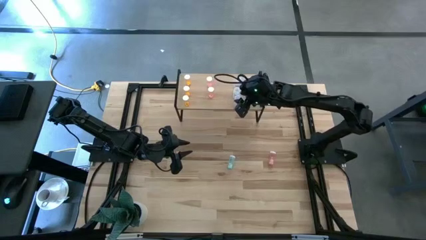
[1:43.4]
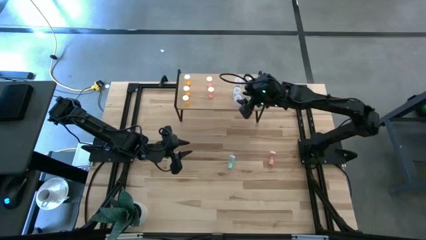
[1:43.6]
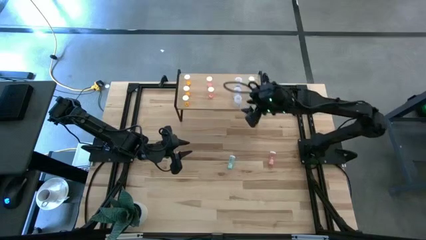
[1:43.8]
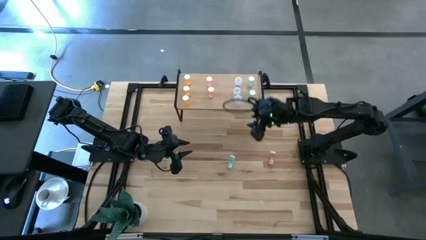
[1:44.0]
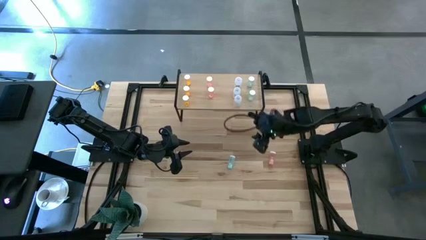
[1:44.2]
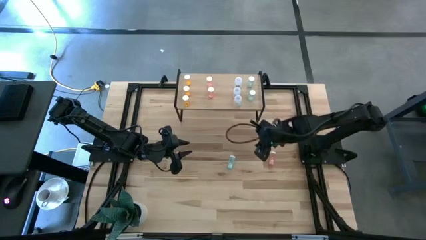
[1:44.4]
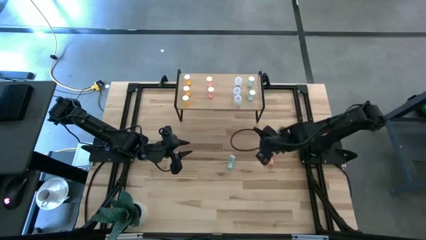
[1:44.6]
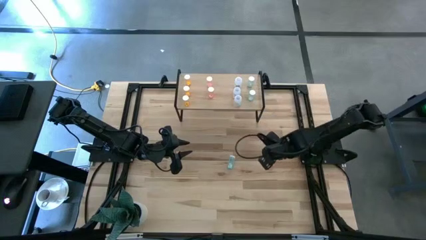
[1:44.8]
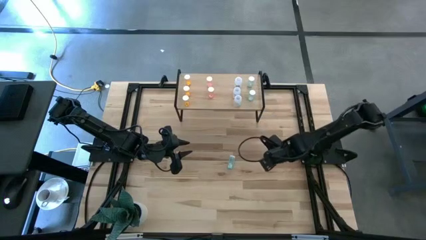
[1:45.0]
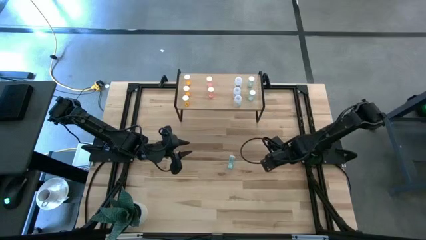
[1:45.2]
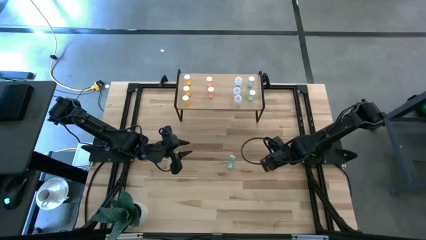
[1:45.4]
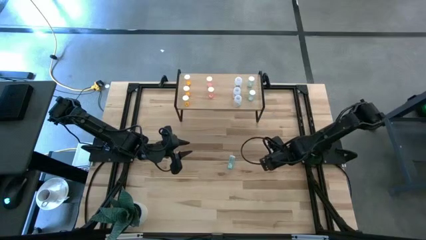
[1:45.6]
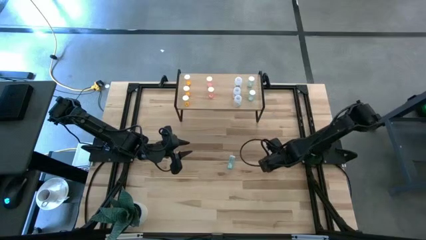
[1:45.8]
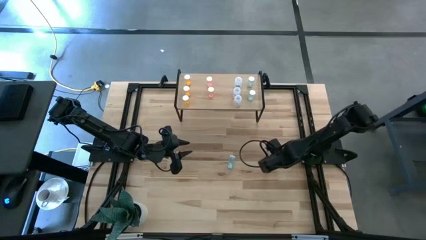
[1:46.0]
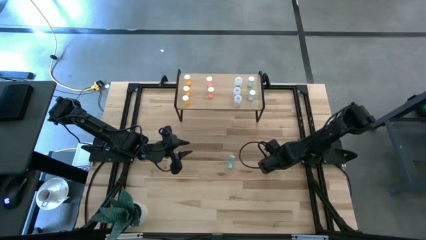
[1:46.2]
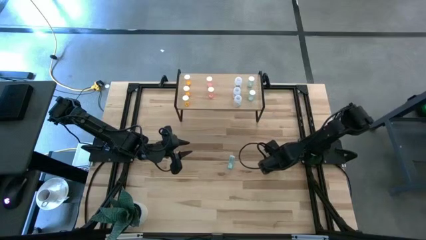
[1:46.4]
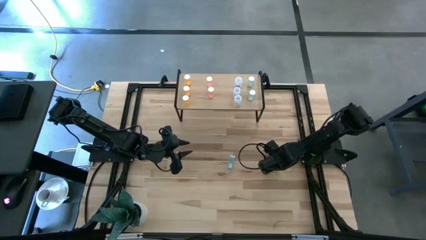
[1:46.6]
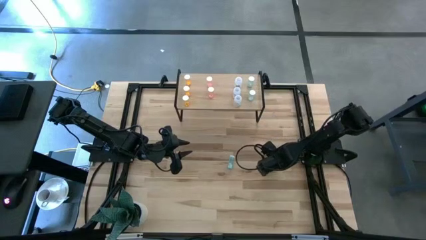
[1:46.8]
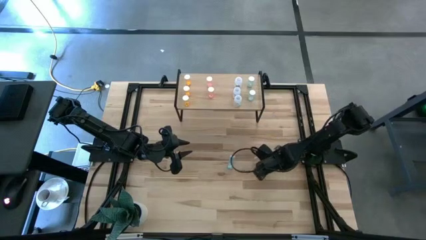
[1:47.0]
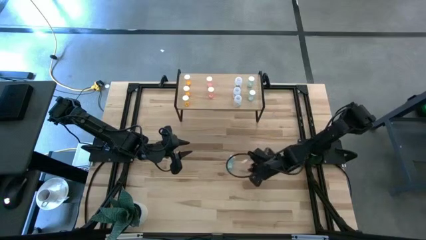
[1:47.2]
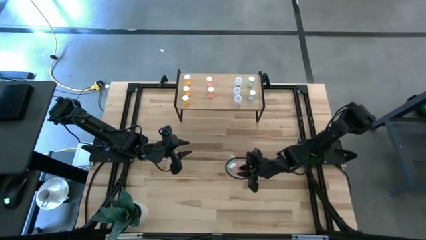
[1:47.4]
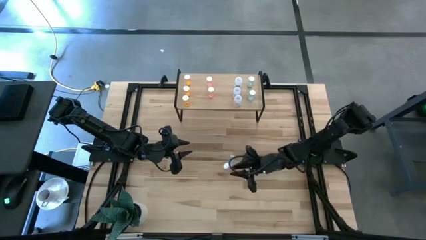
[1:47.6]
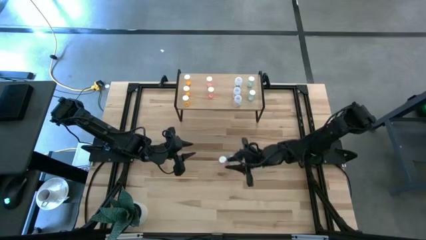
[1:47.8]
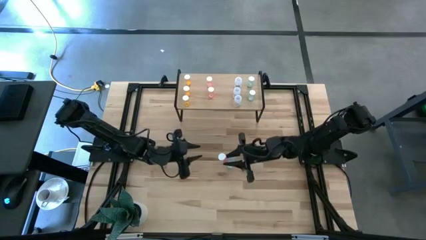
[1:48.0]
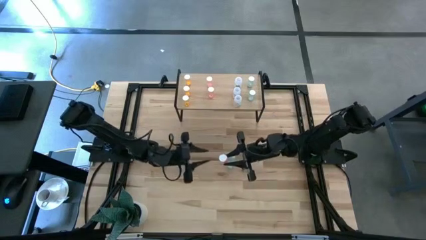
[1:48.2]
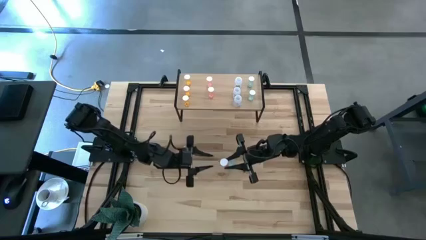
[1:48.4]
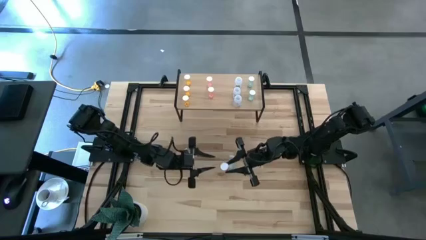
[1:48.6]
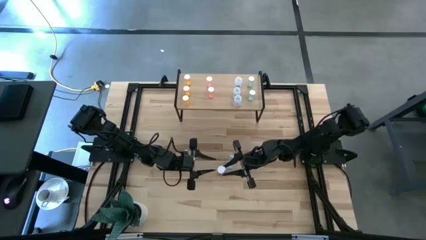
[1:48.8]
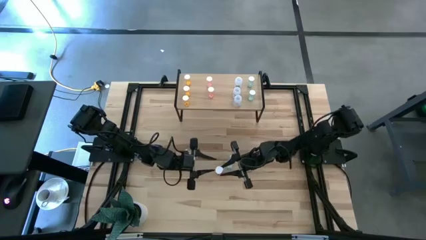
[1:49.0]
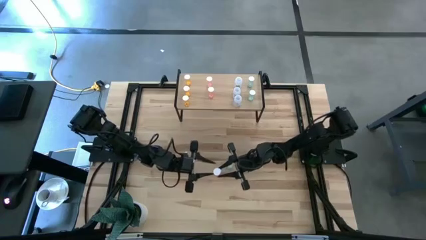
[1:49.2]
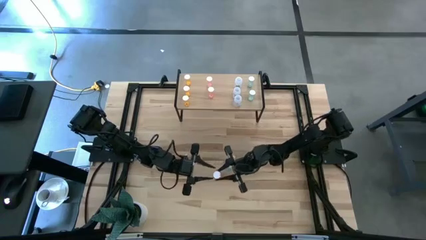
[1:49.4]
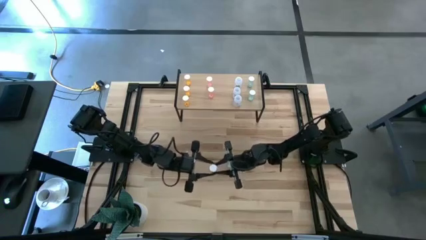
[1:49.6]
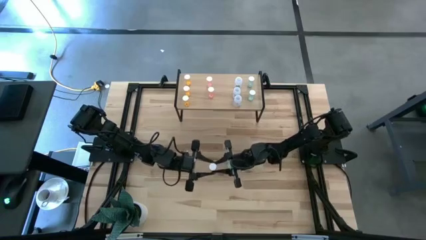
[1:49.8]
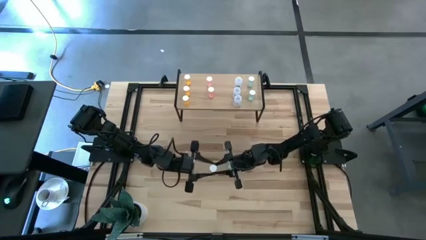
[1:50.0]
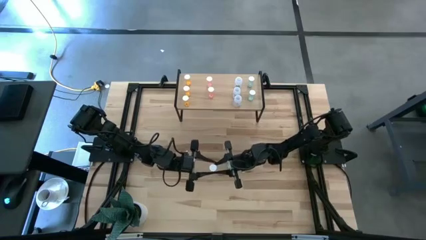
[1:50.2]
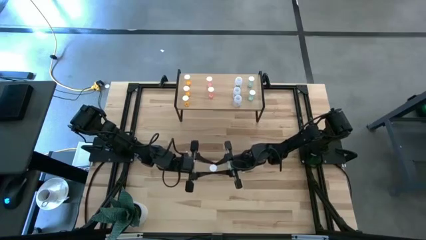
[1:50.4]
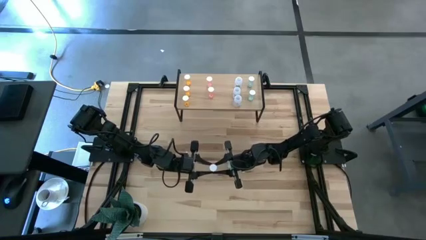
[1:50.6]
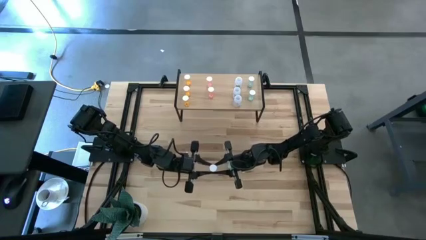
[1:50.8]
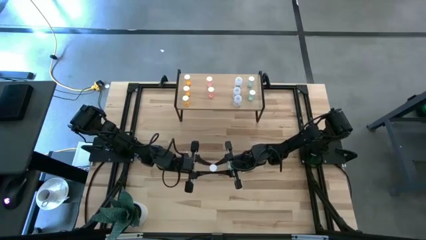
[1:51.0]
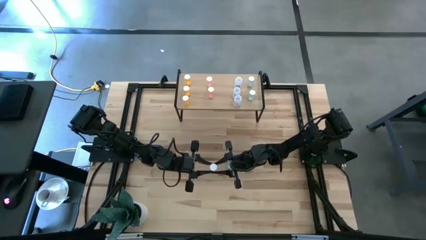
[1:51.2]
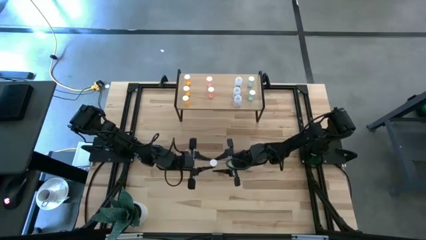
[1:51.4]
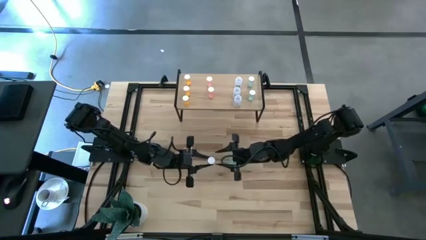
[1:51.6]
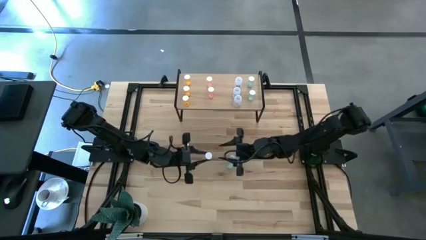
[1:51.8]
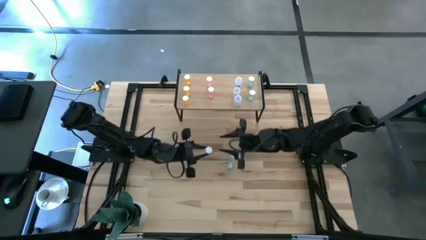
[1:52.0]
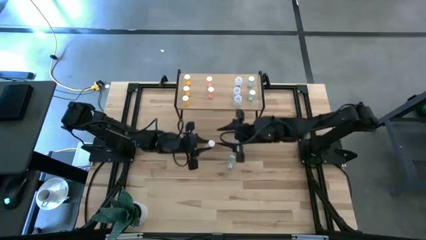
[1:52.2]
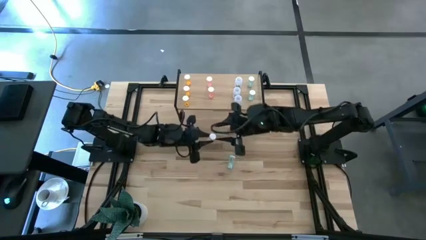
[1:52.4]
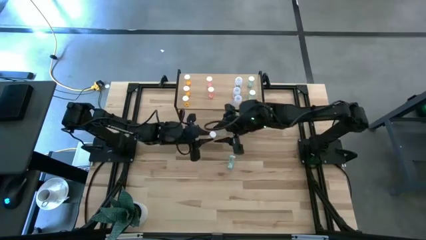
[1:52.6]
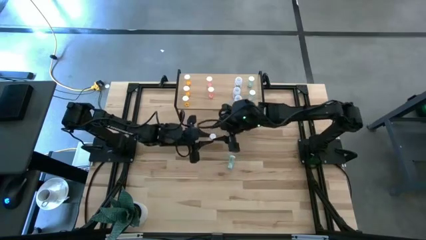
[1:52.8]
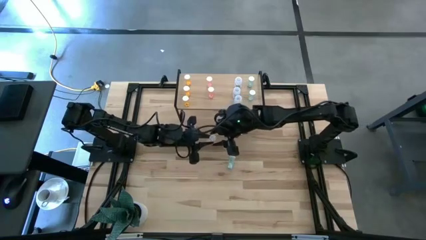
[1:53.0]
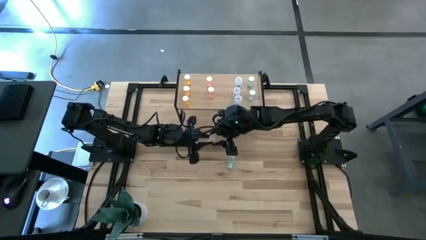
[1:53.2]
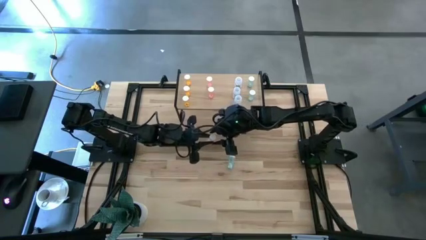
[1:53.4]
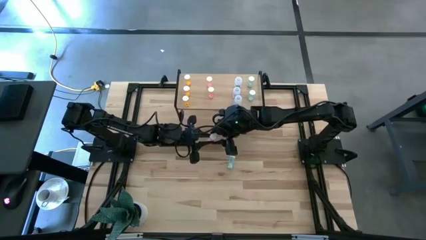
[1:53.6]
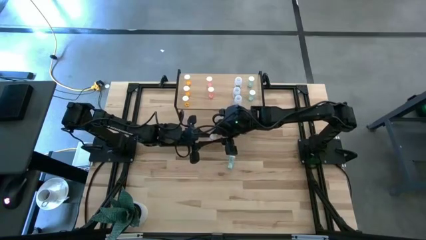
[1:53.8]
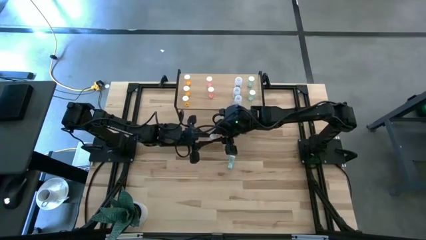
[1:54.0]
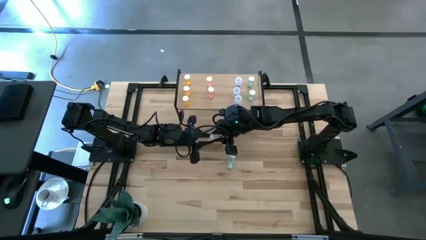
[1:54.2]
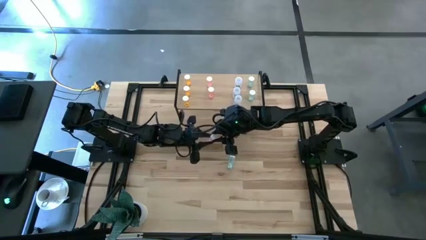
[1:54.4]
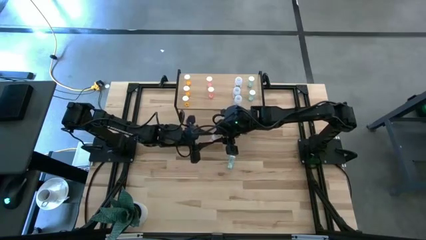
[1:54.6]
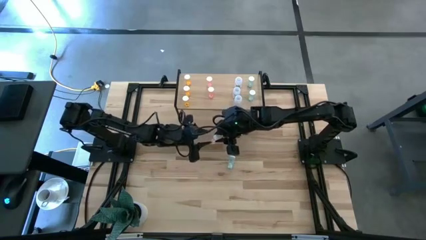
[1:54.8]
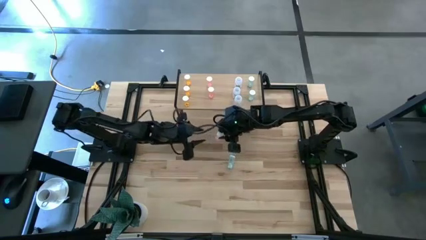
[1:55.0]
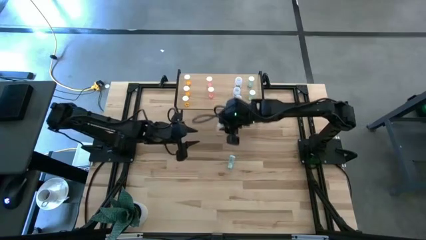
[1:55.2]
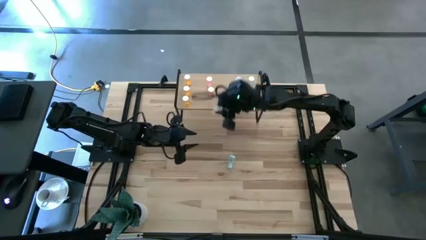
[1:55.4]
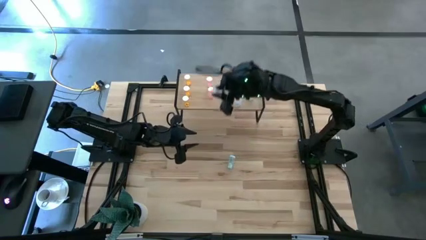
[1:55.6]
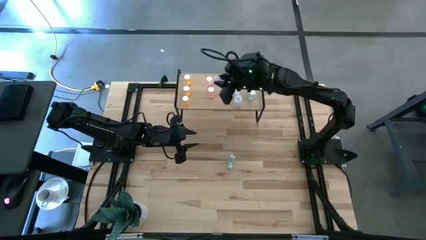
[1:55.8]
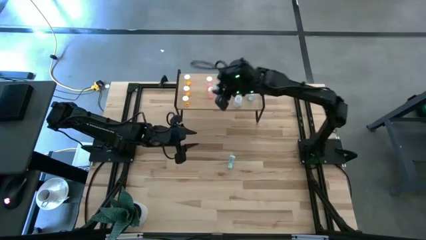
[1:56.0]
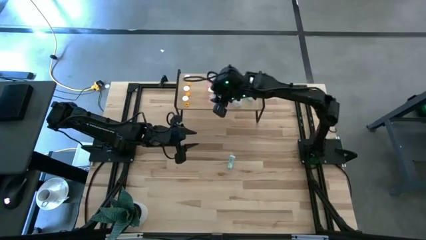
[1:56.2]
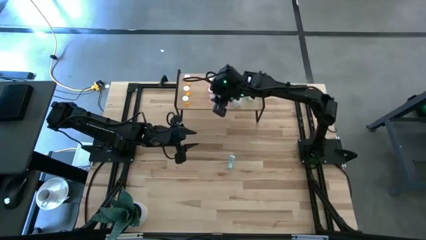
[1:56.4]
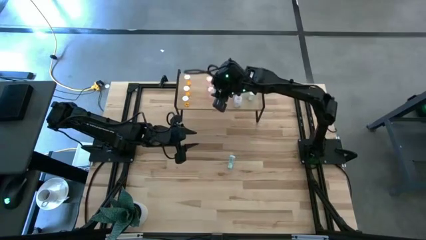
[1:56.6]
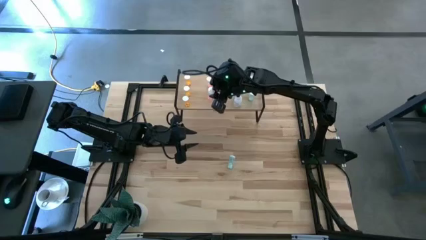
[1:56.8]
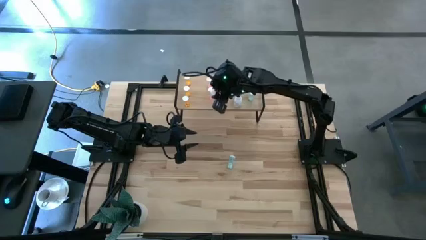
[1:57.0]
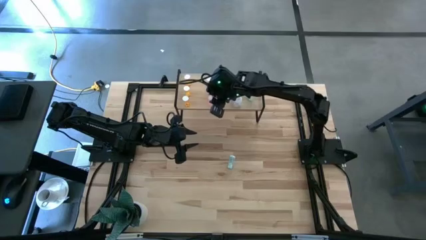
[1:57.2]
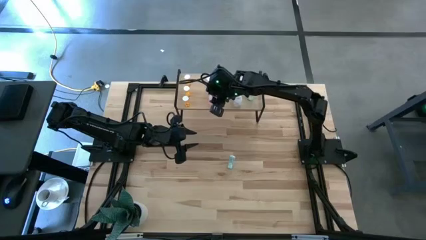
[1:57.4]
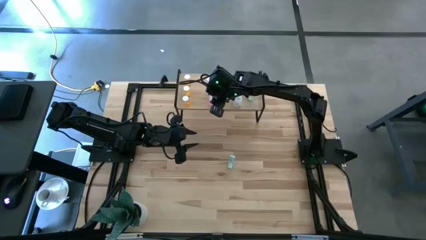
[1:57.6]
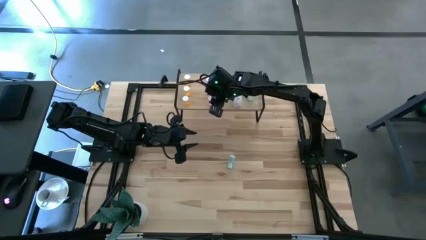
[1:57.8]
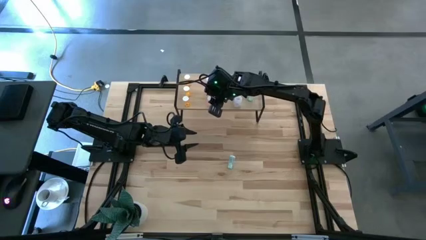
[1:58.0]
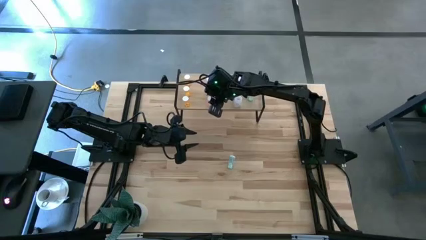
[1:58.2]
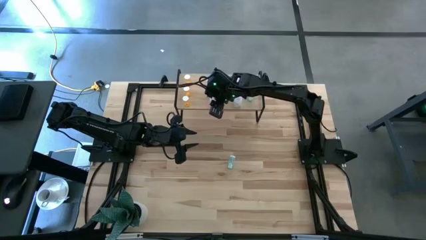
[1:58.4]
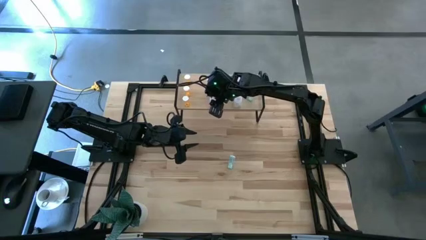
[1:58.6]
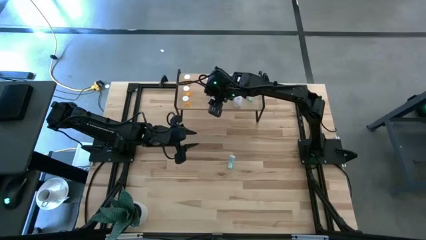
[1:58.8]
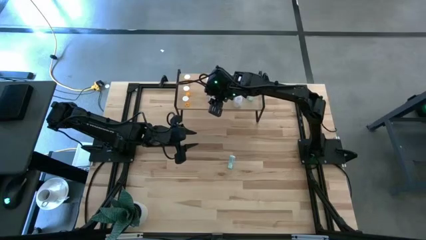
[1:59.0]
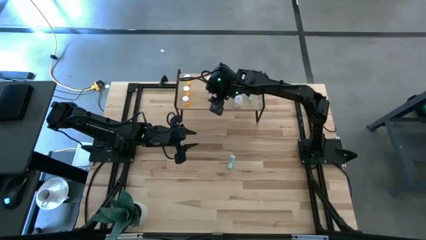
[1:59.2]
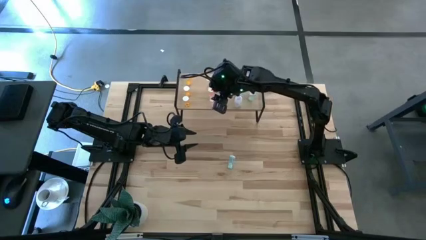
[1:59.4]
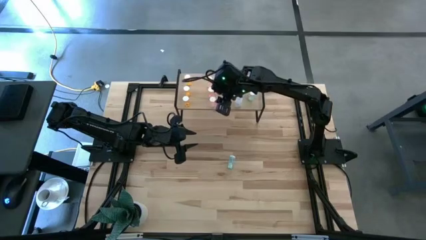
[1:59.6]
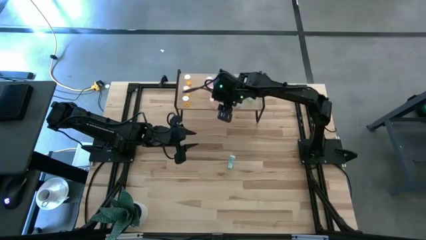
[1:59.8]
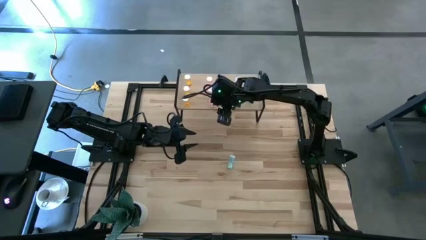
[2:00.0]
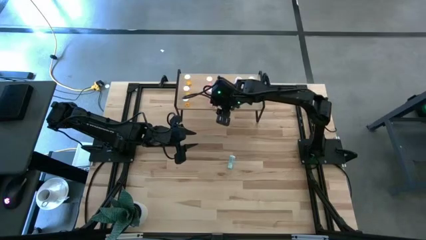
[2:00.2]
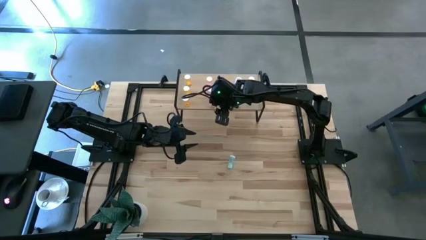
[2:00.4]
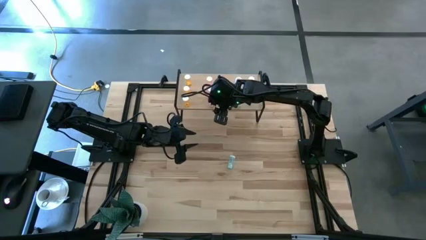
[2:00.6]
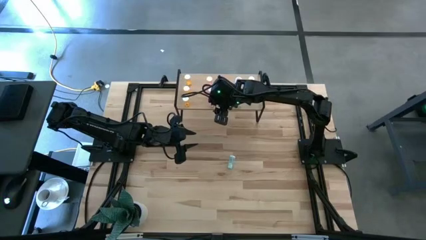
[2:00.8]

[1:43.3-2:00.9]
Task: Pick and place medicine bottles onto shelf by color
Align the pink pill bottle with the other pink pill bottles on the shelf
